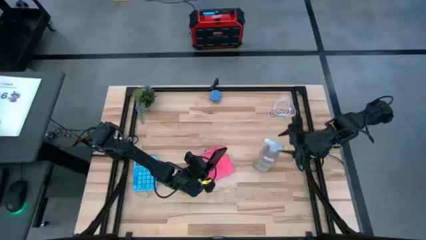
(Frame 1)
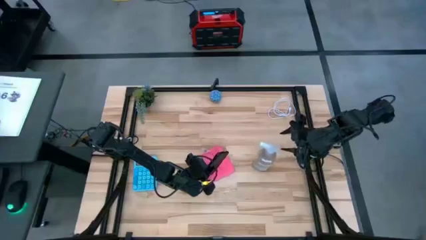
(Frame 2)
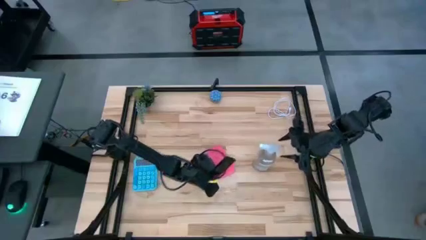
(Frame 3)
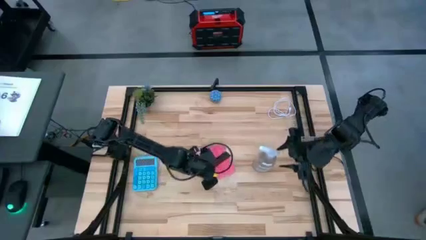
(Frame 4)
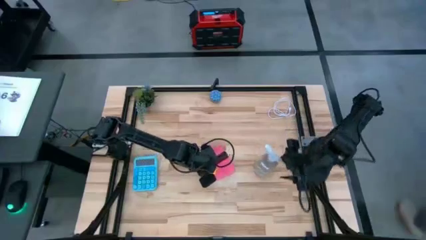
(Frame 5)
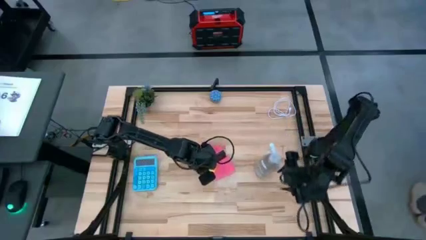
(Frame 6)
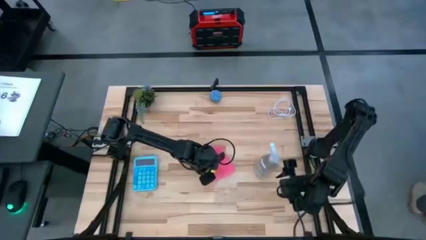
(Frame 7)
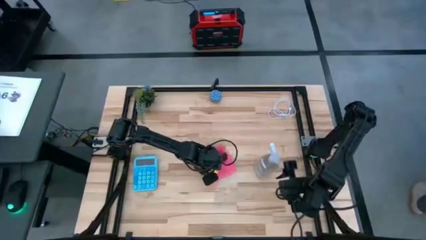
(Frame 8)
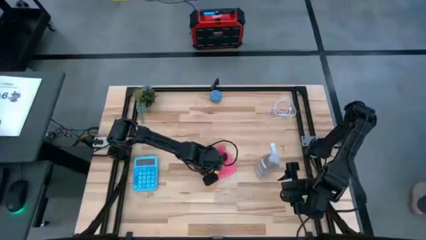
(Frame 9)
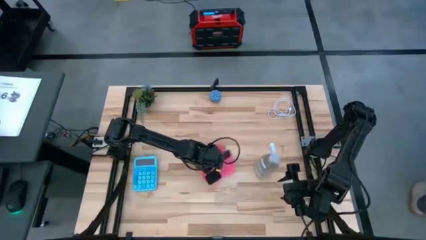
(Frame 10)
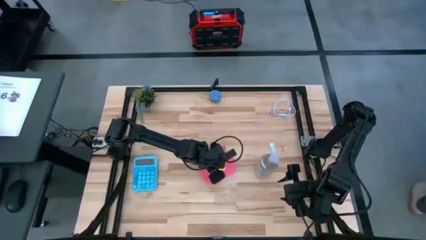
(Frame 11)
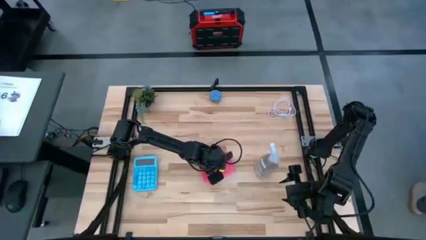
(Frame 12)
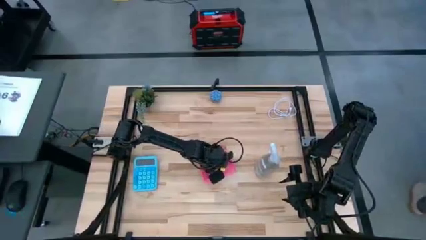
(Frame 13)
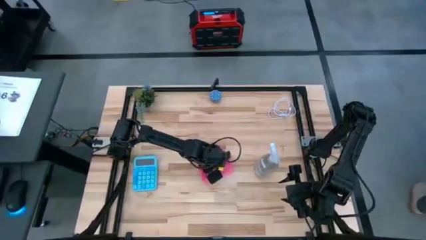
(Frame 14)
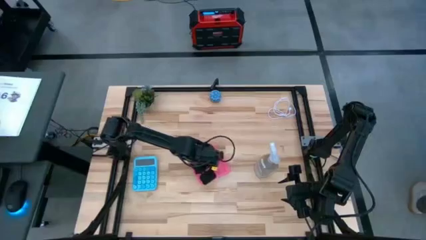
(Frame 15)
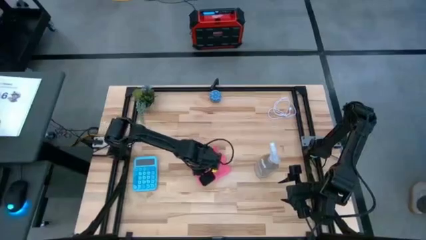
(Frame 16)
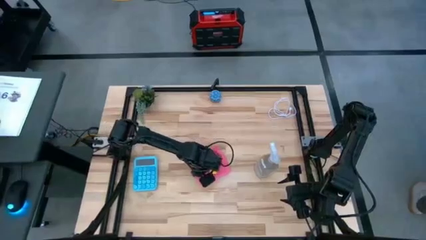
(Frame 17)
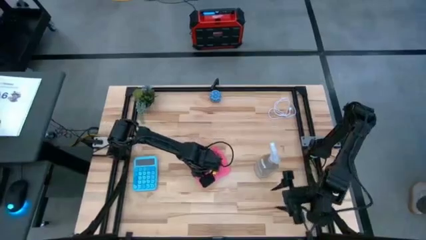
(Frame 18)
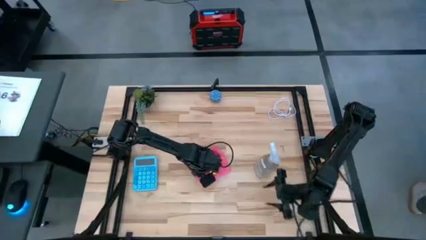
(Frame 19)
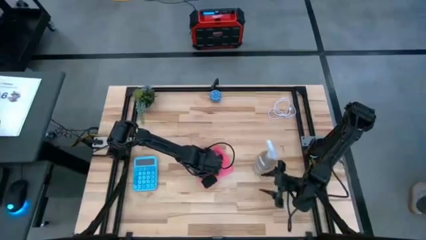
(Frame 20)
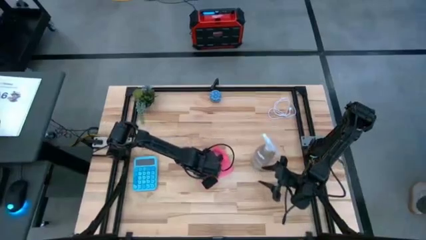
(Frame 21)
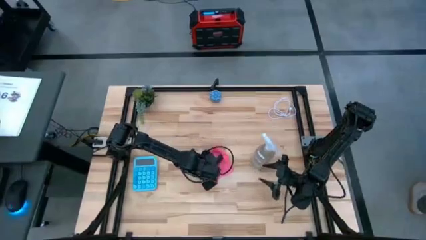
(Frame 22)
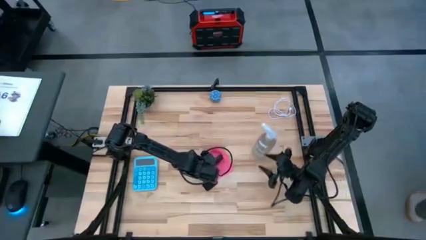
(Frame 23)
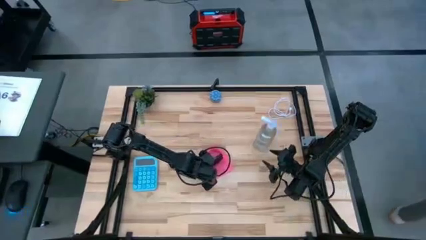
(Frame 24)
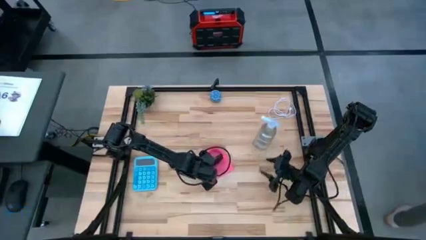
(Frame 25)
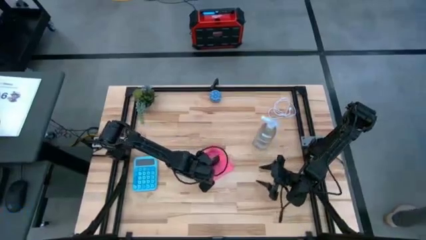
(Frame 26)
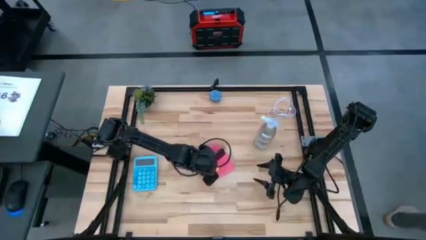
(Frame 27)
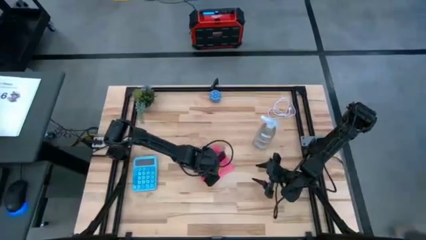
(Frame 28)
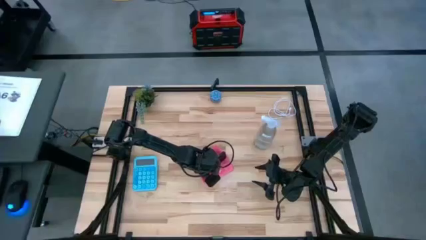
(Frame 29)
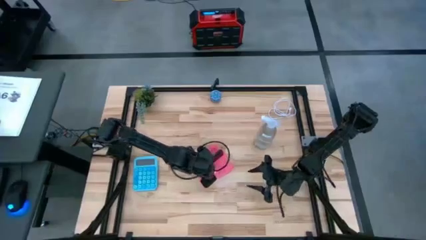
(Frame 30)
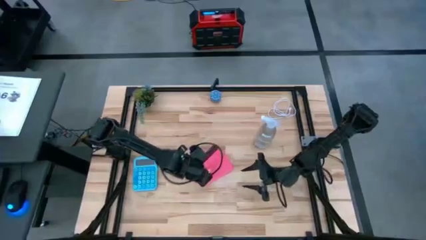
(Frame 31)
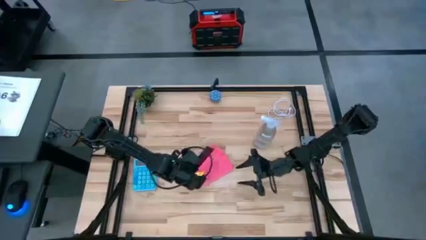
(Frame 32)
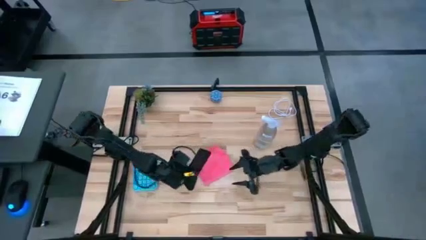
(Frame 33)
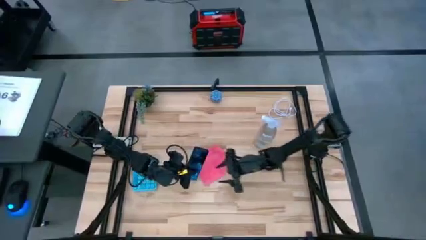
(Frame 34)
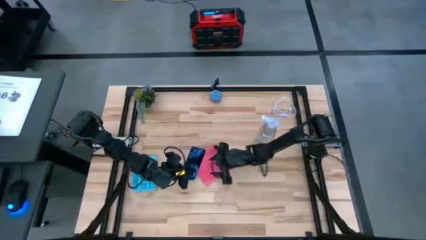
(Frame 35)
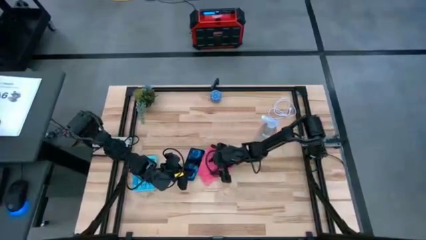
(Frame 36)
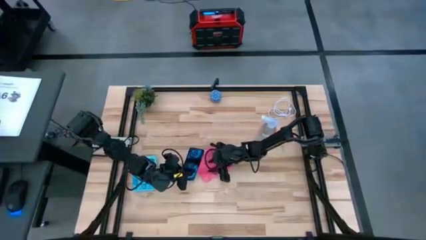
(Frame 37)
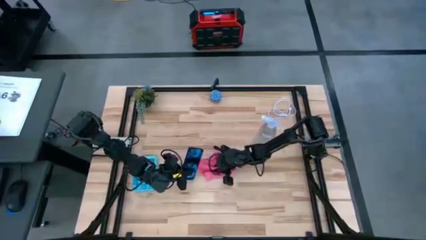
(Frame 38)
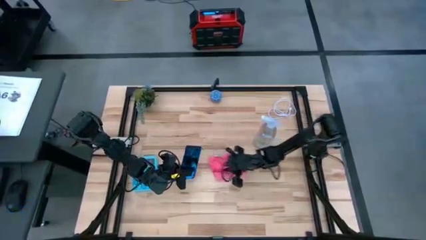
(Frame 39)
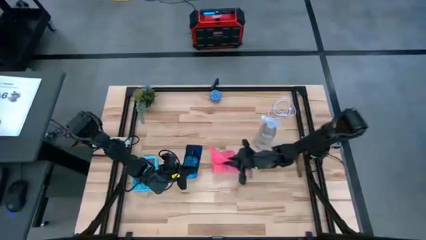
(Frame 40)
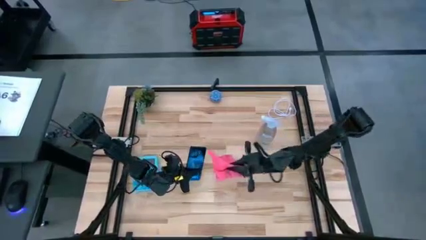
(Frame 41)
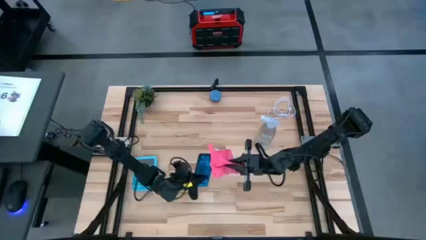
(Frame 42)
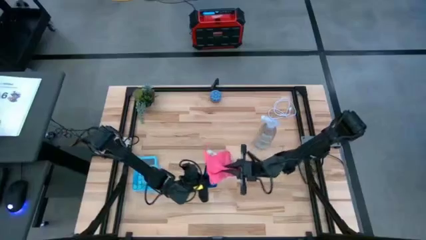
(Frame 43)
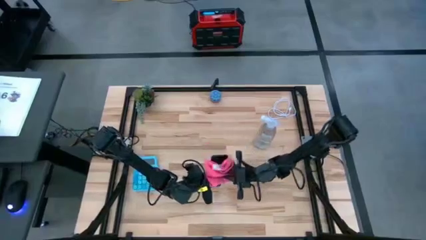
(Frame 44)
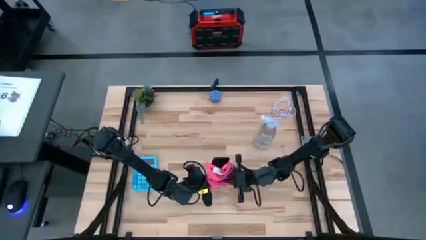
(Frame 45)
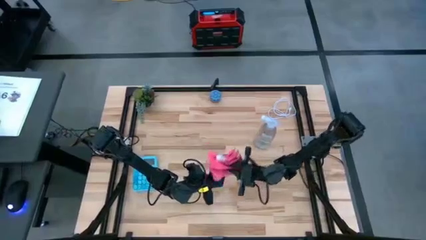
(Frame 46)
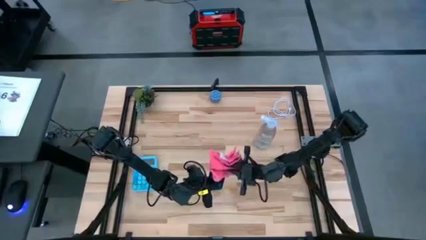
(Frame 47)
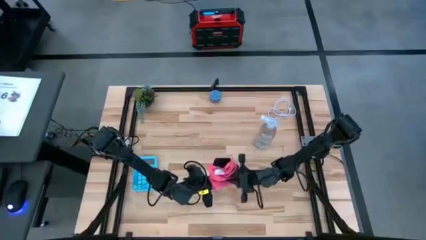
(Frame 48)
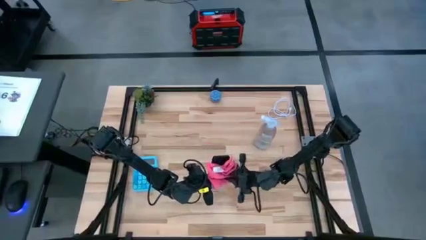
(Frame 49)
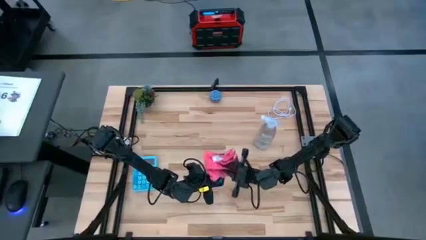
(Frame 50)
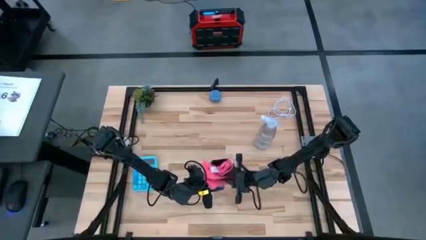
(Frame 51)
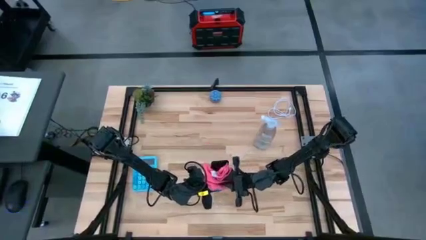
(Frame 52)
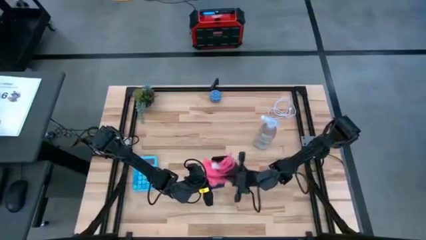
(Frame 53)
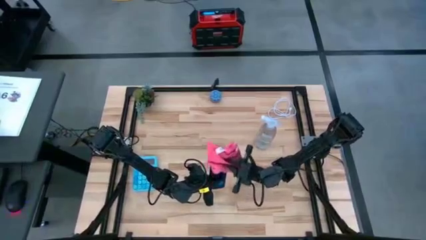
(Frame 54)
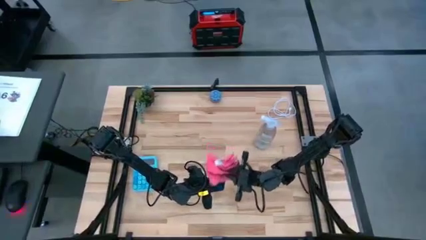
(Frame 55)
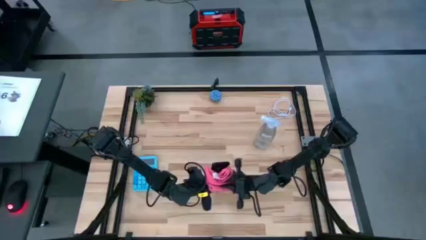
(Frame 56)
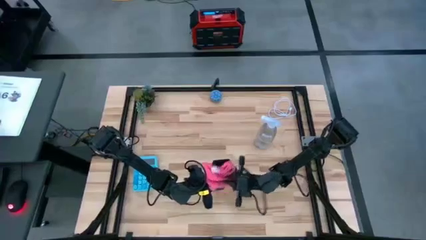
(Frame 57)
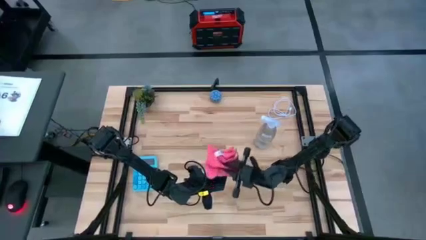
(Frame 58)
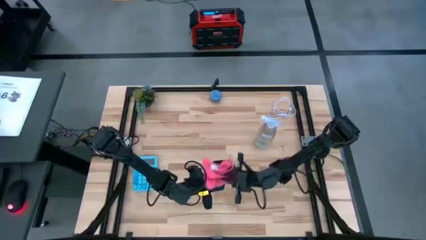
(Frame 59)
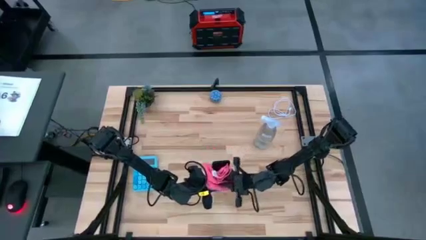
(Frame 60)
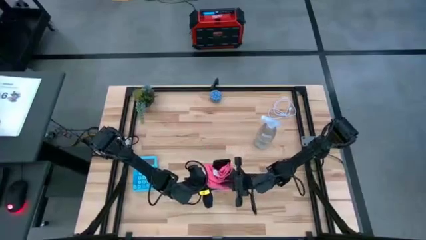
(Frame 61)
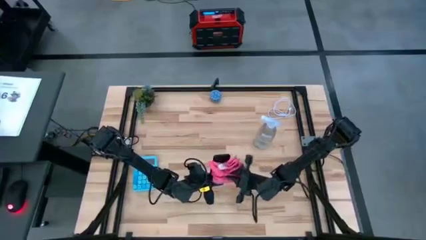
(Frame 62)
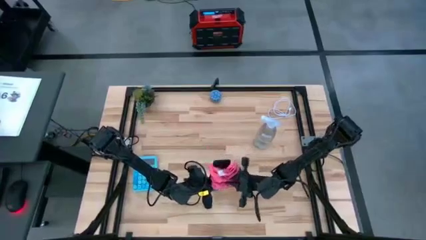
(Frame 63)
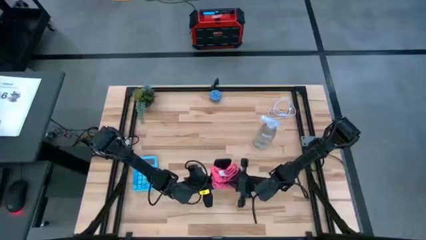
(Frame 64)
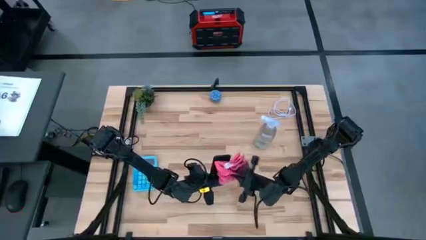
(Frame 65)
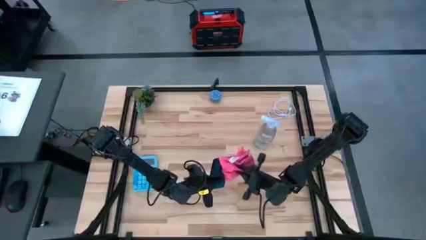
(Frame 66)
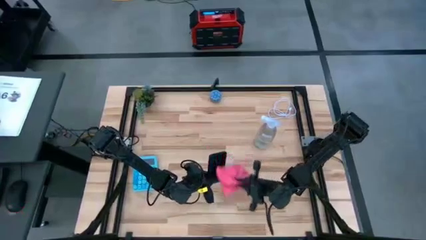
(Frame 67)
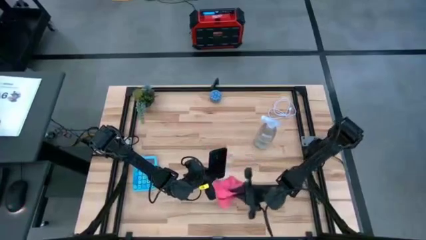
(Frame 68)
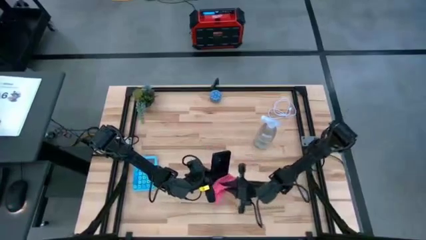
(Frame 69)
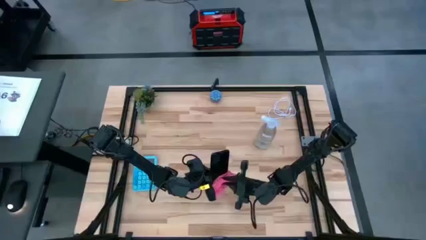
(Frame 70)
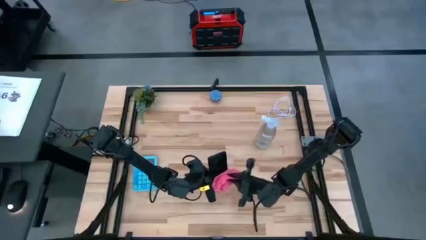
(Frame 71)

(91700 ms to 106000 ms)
Task: Apply microfiber cloth
Wipe the black cellphone with the pink microfiber cloth
